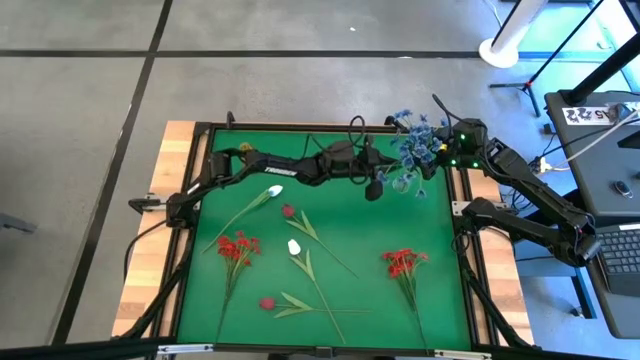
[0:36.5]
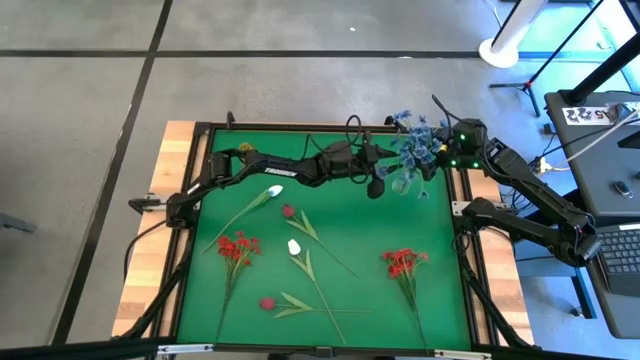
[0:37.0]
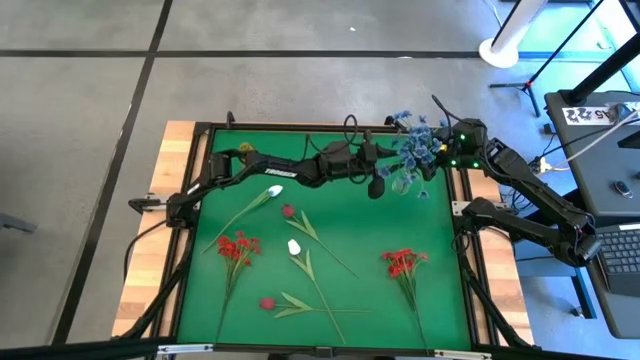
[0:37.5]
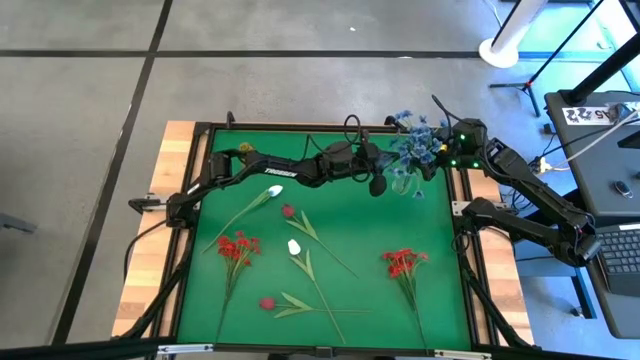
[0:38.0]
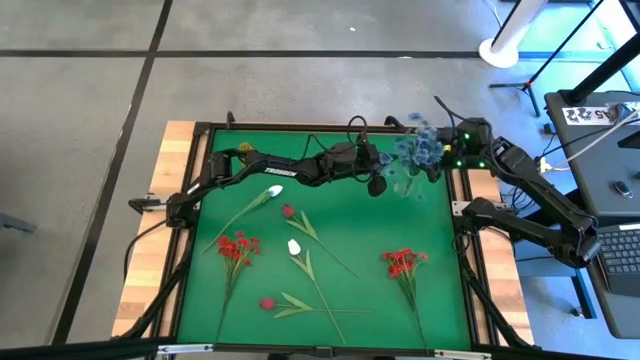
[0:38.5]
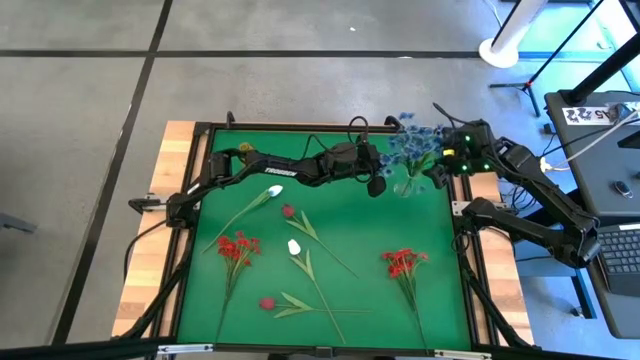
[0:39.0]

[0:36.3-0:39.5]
Task: Sort flowers into vase by color
Put the light blue flowers into the transparent vase

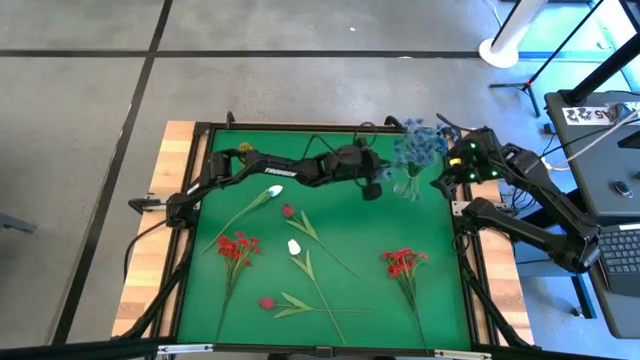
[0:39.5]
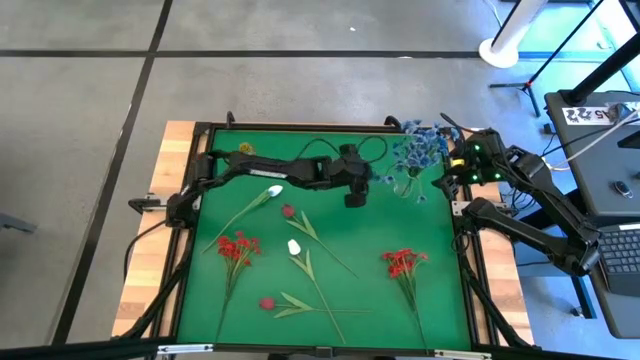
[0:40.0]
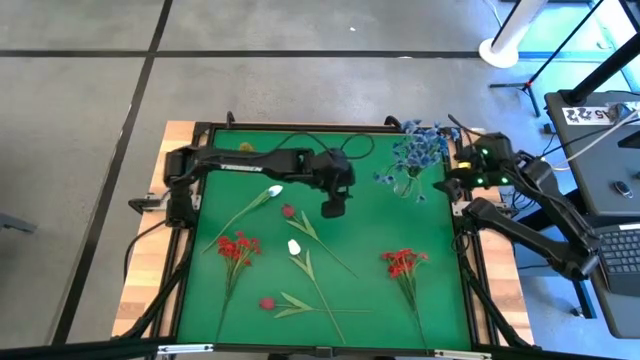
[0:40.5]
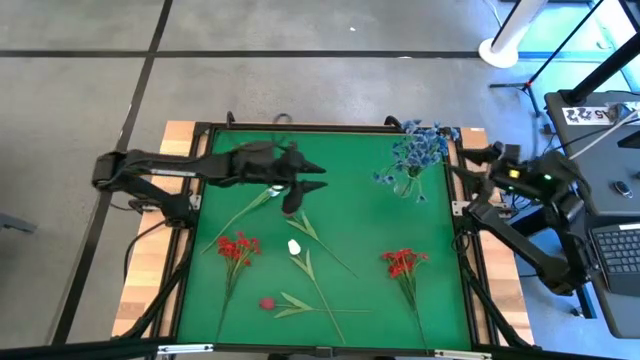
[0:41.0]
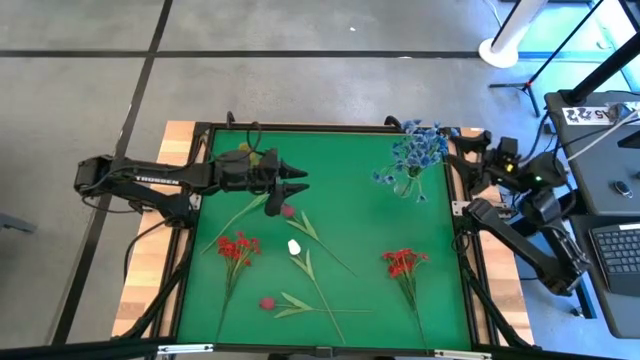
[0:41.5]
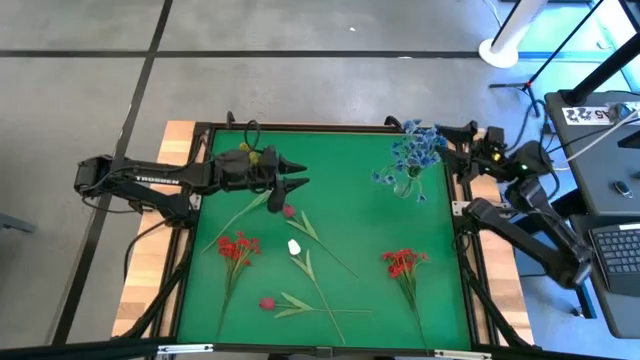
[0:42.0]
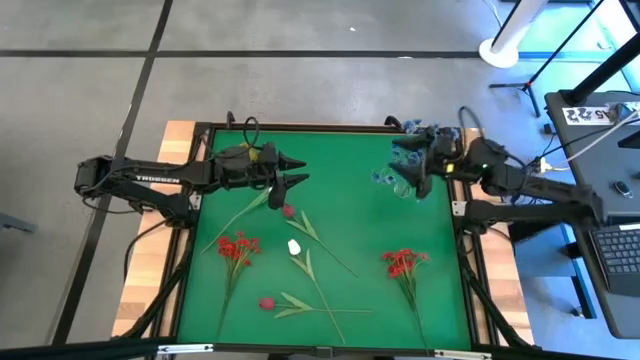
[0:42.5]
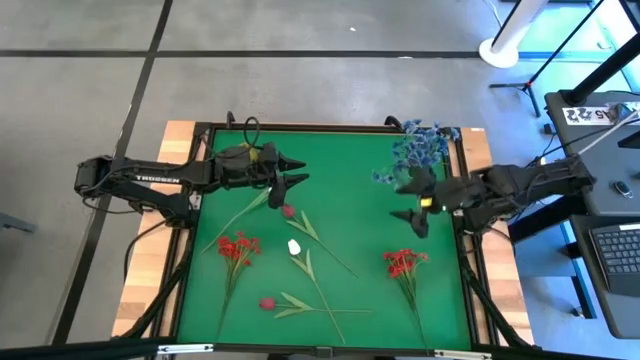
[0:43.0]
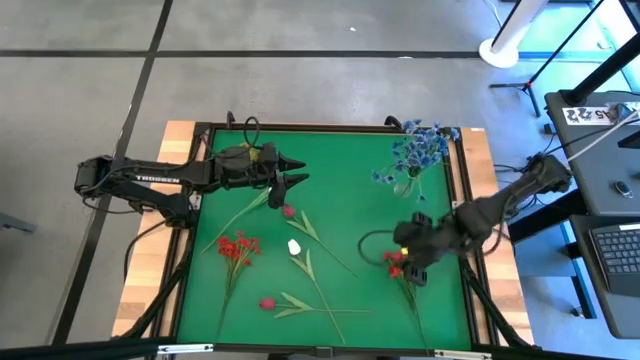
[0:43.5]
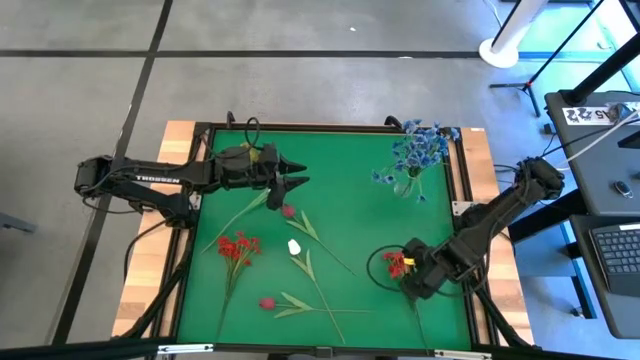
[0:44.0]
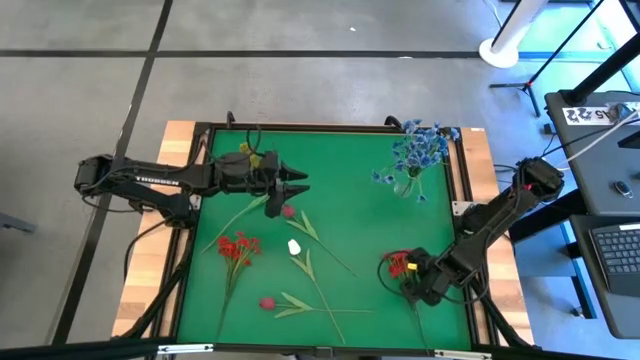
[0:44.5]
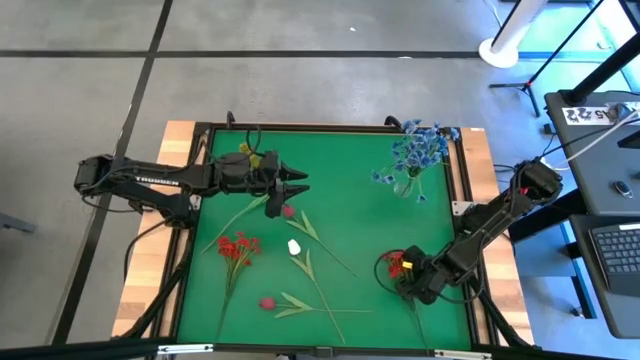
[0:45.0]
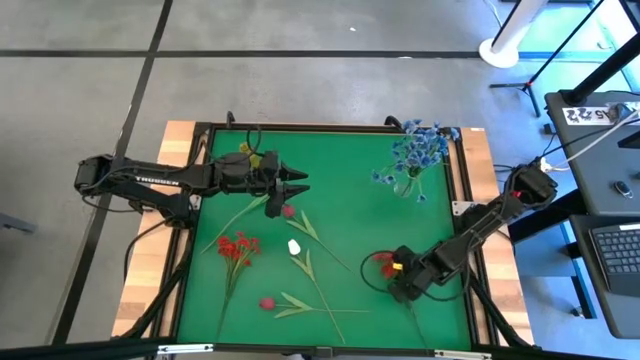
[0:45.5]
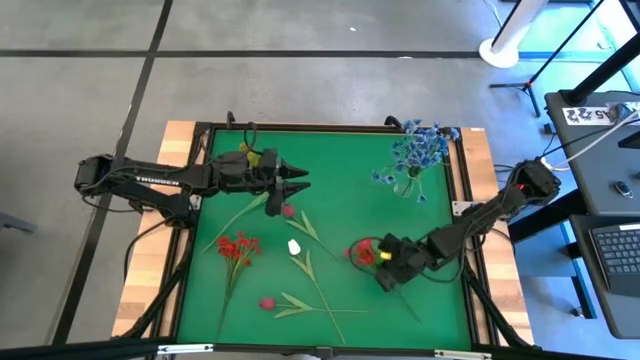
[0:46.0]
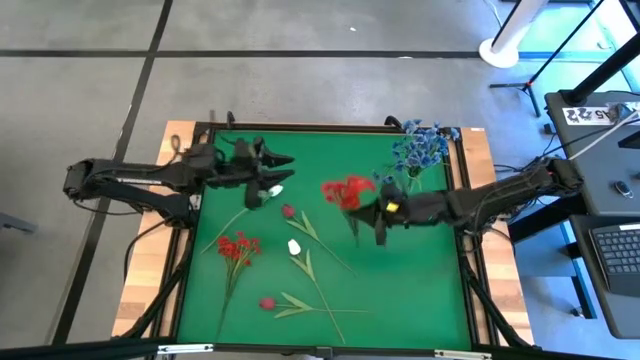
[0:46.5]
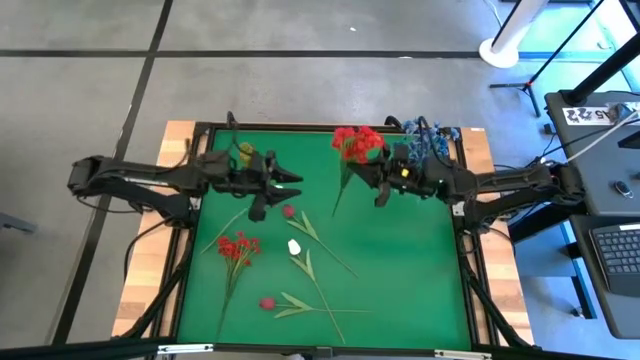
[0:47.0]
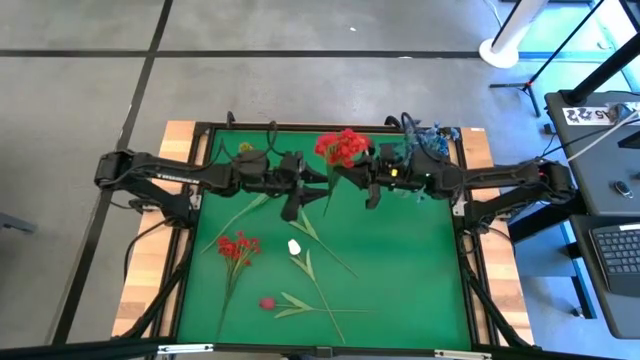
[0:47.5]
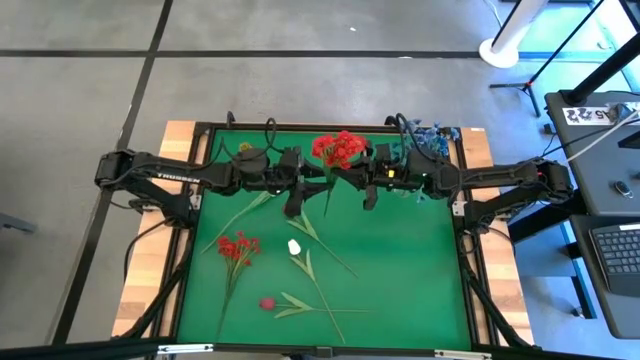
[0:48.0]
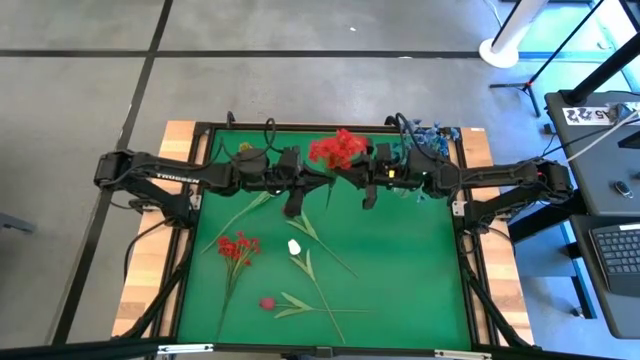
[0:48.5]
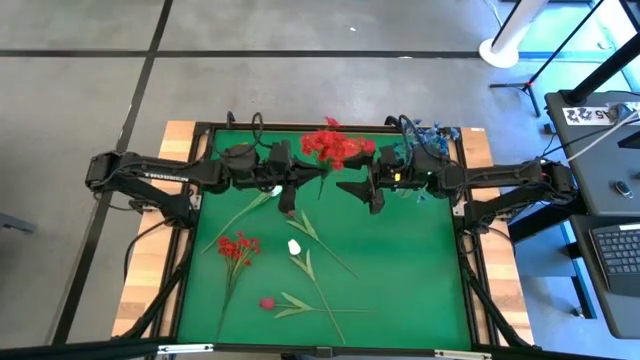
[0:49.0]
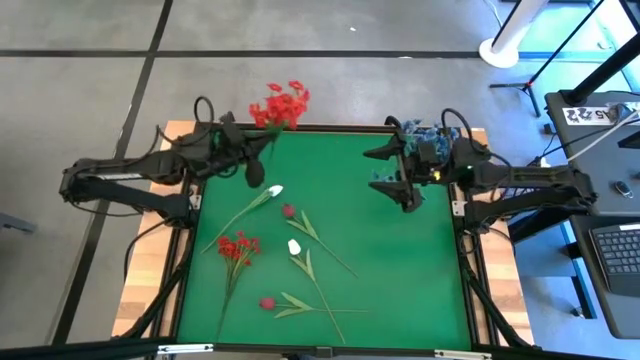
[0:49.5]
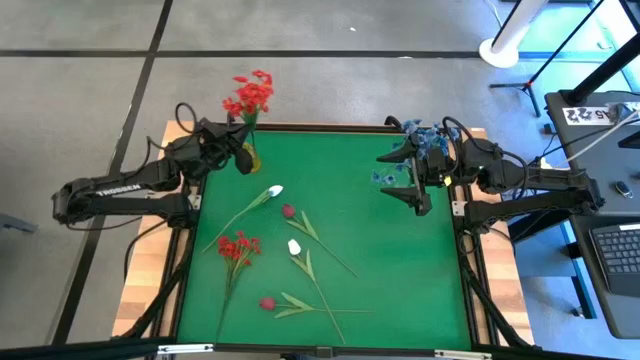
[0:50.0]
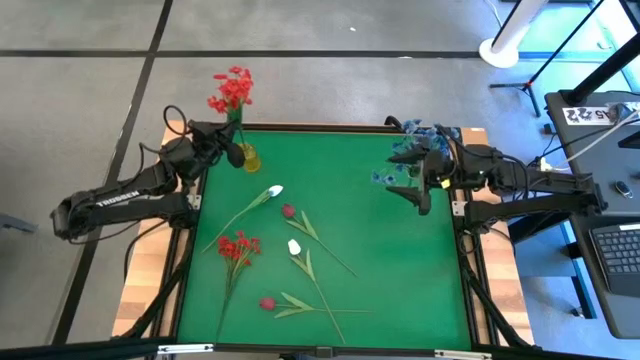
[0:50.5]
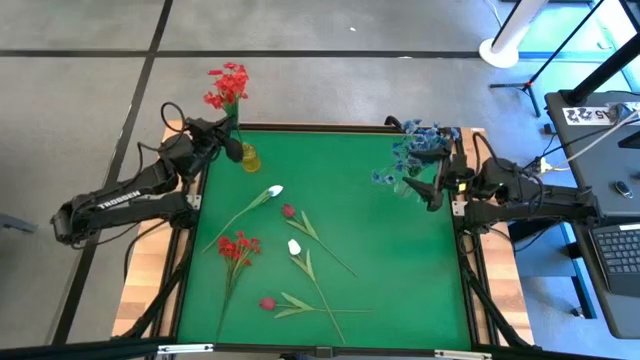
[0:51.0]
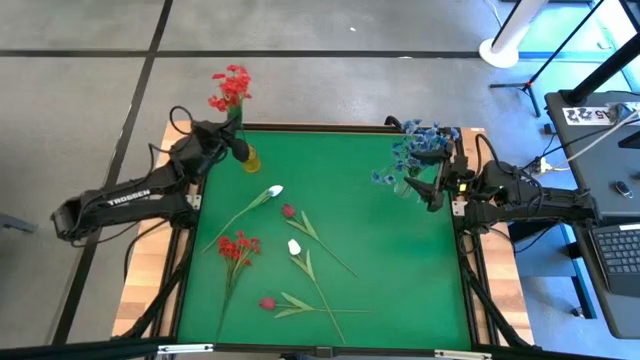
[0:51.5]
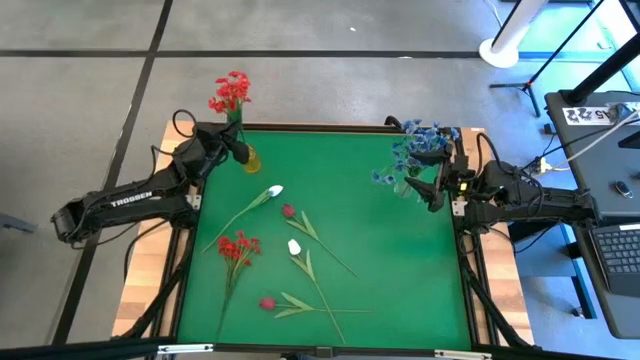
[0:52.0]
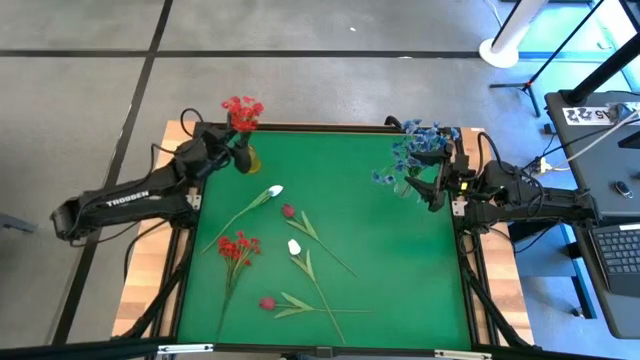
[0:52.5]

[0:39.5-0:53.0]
Put the right red flowers into the yellow vase

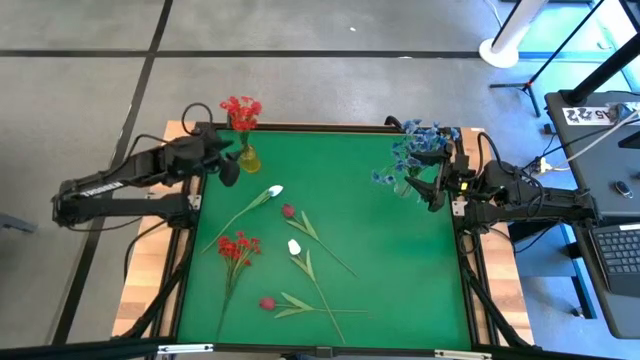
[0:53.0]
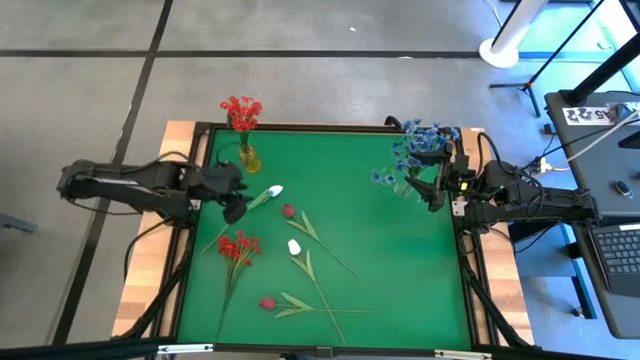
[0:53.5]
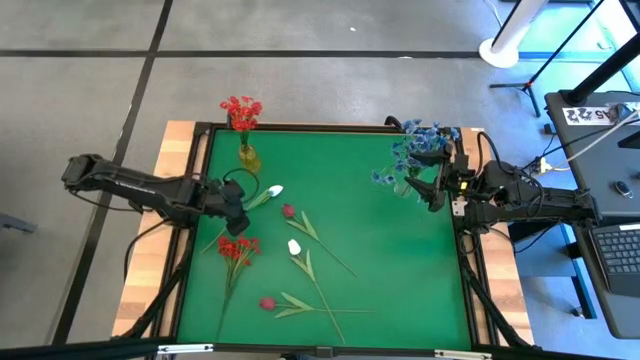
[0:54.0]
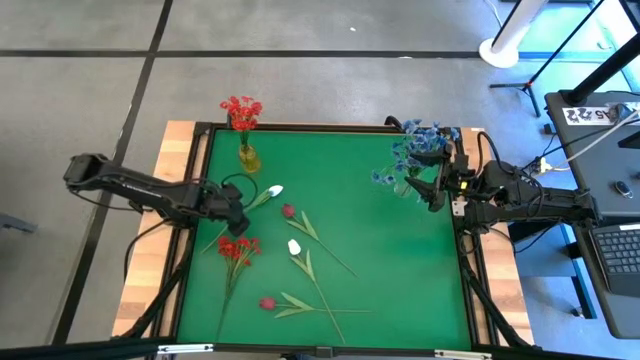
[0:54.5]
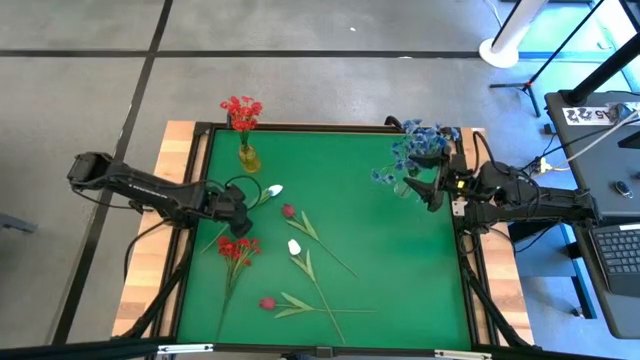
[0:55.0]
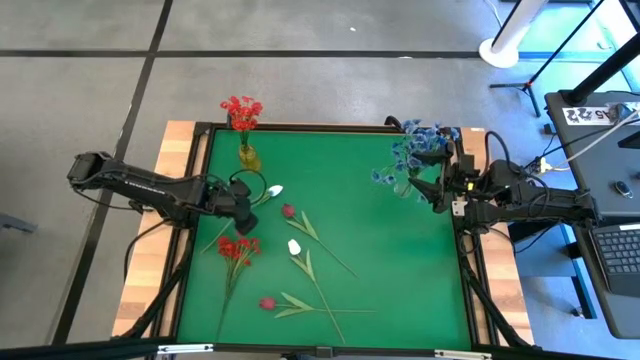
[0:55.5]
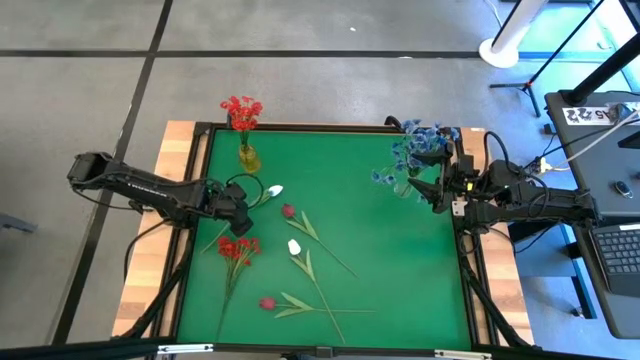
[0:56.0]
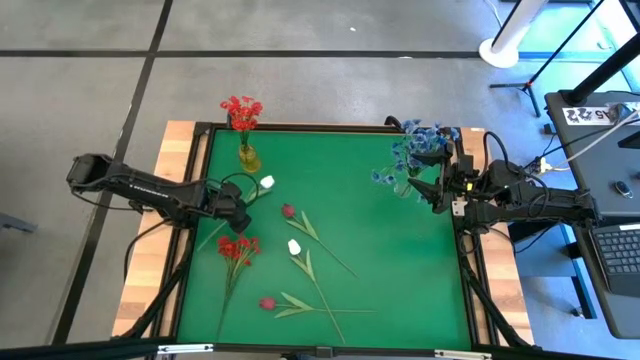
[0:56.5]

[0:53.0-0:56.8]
Put the top white flower into the transparent vase
